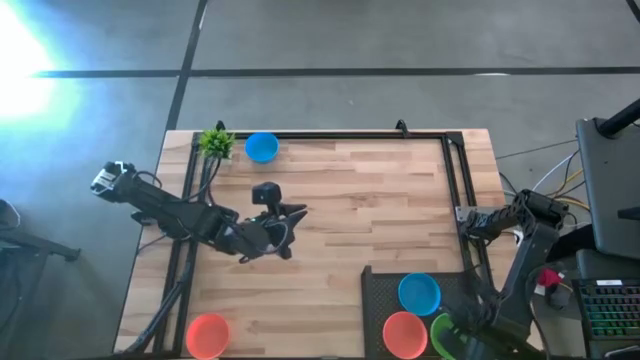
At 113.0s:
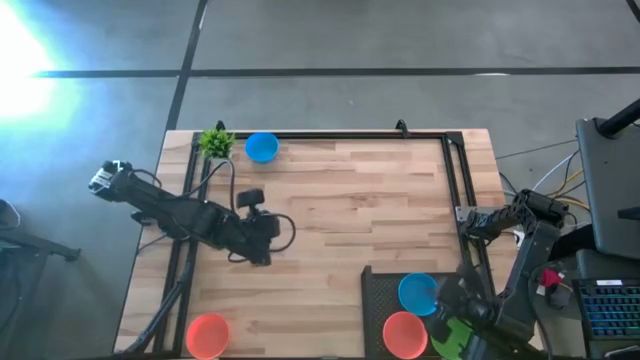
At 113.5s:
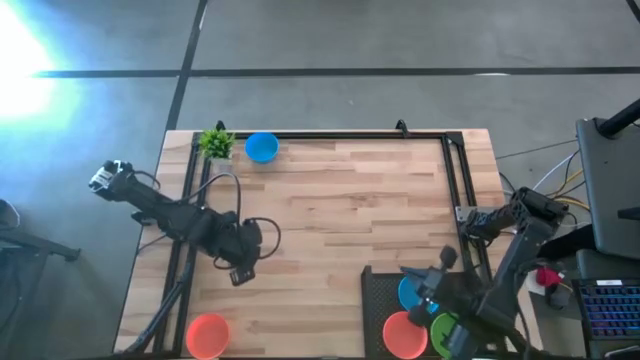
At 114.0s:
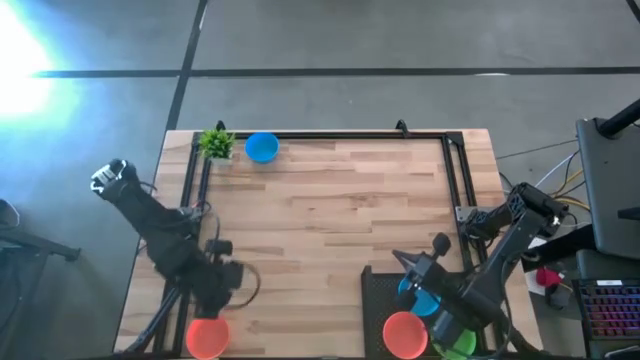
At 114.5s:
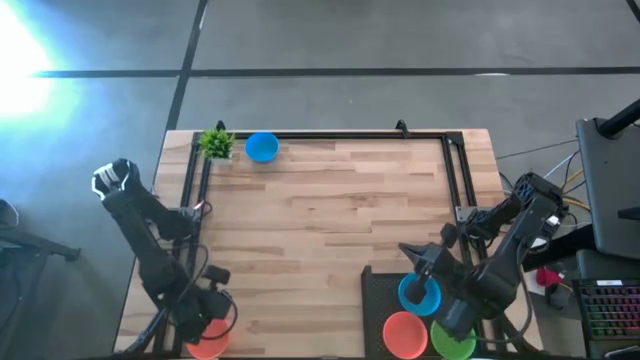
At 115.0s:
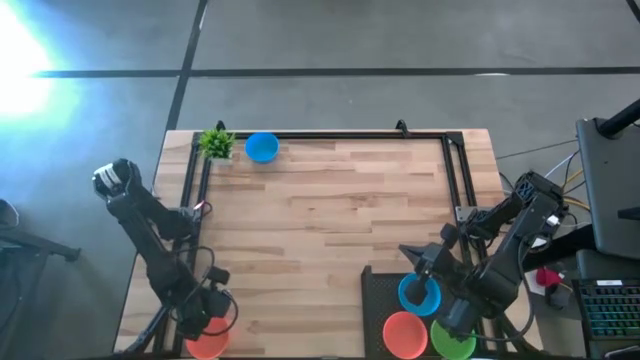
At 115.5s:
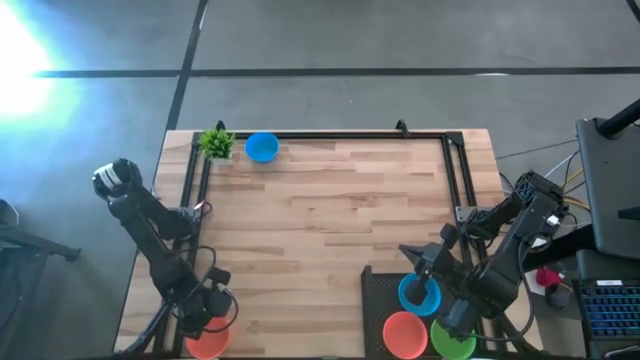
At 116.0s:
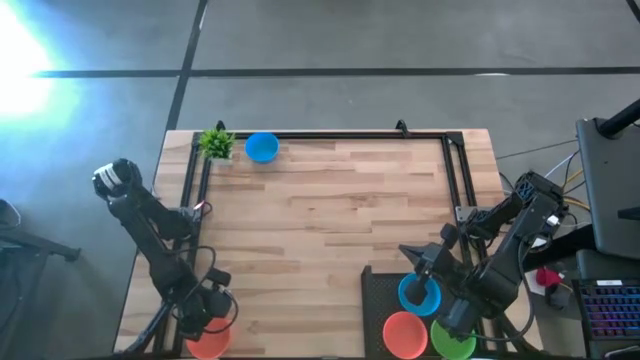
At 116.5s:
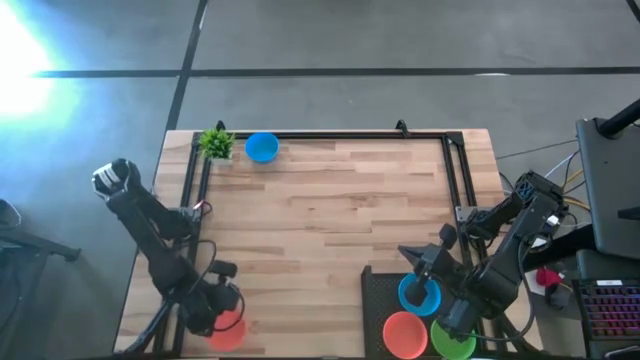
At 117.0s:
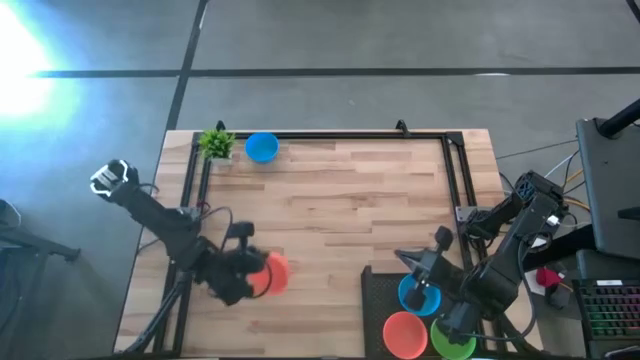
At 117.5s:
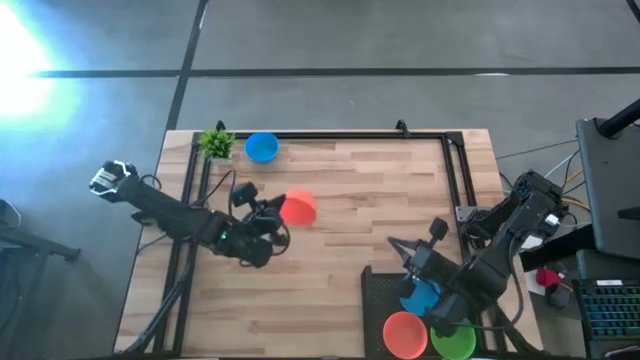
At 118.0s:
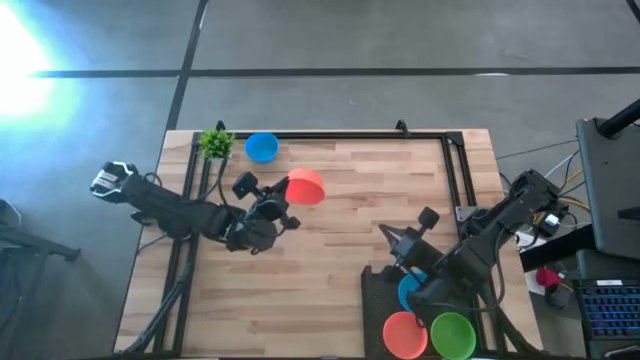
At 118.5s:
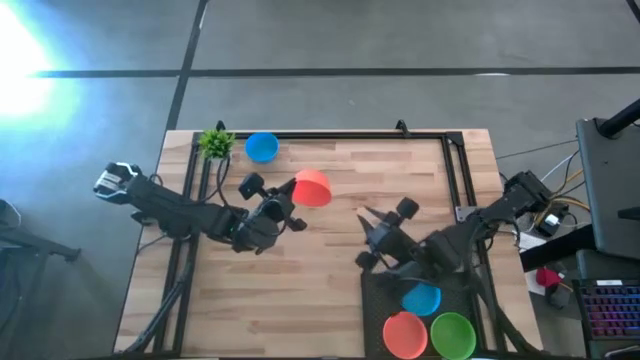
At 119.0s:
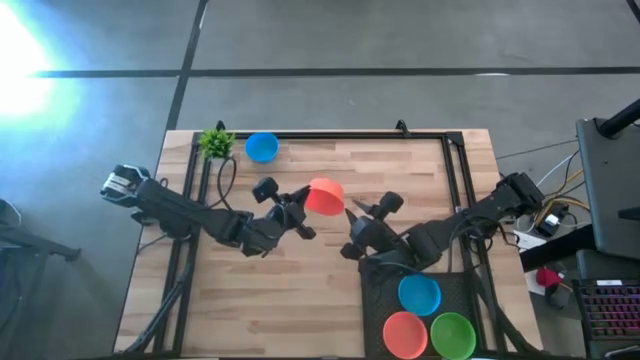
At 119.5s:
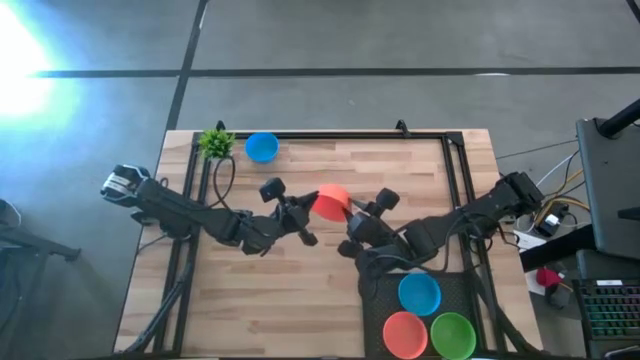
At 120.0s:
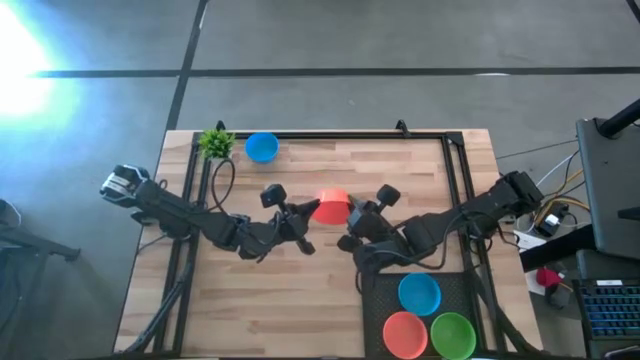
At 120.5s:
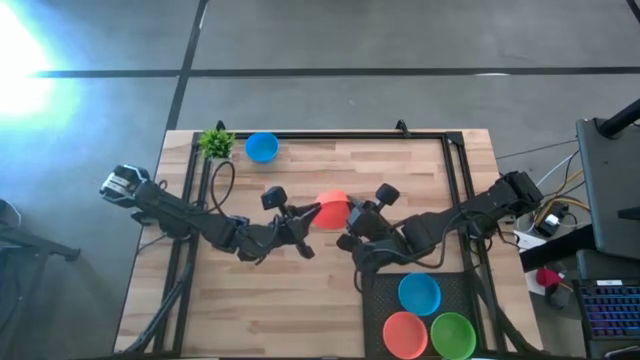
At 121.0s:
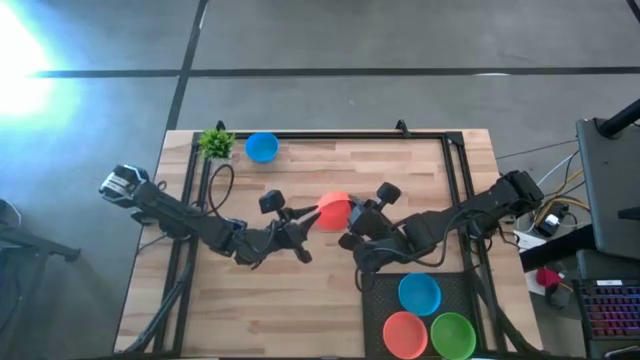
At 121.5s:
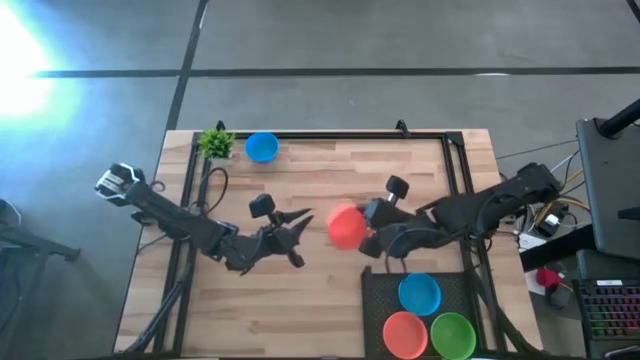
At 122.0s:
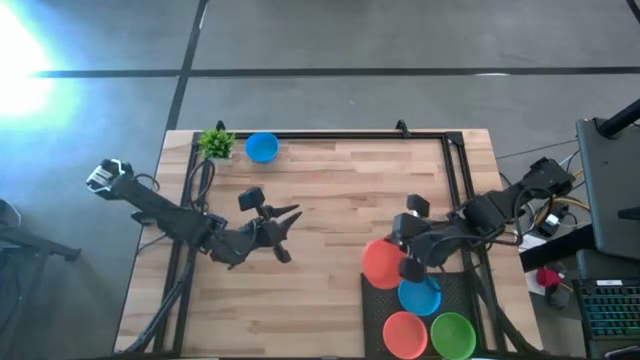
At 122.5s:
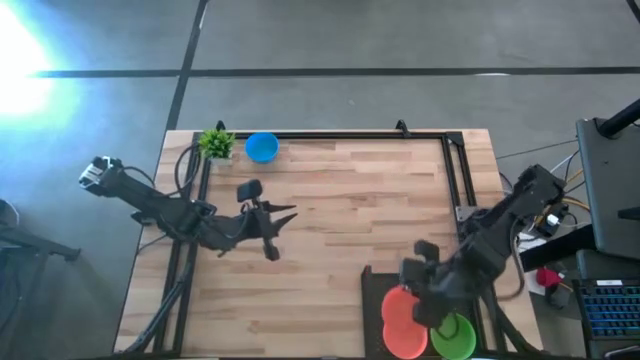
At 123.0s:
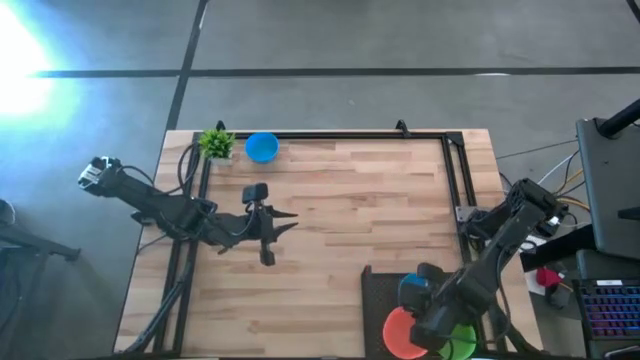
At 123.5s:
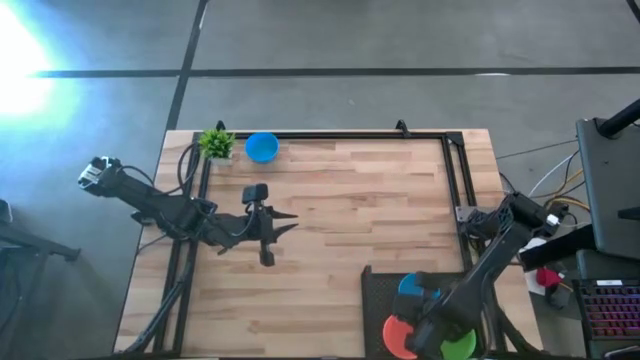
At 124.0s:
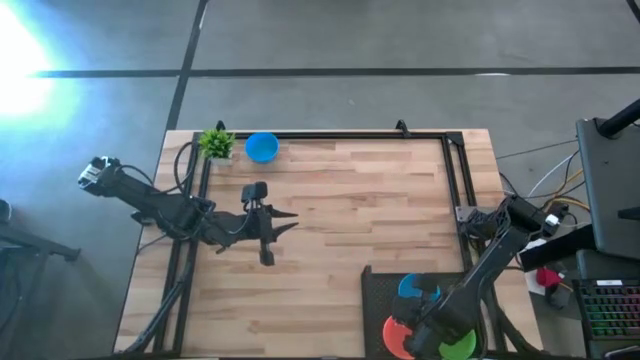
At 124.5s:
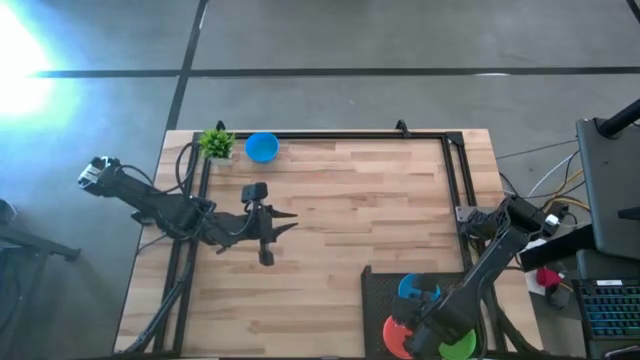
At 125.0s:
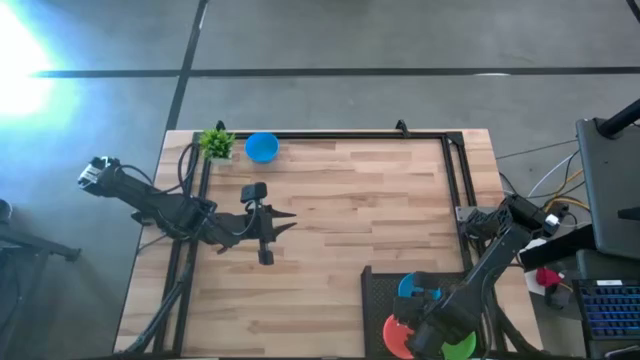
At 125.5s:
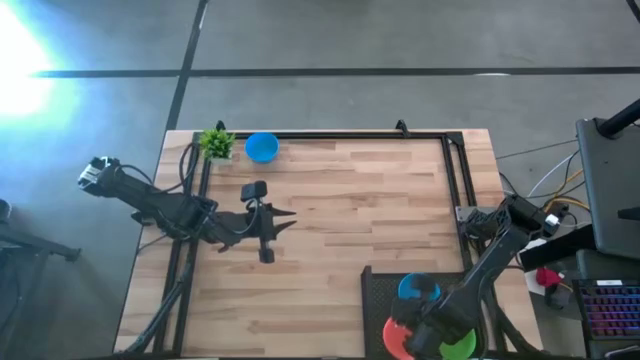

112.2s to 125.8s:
Task: Pick & Place Mini bowls
Stack the orange bowl on the orange bowl on the shelf

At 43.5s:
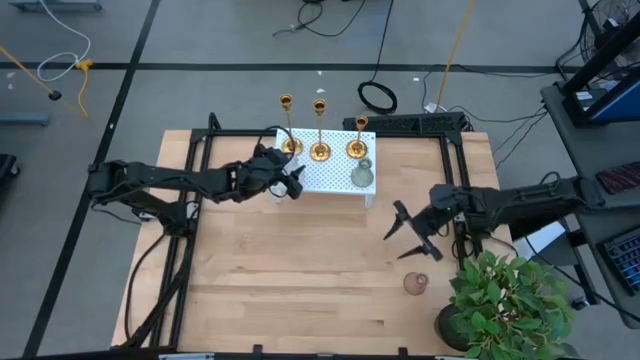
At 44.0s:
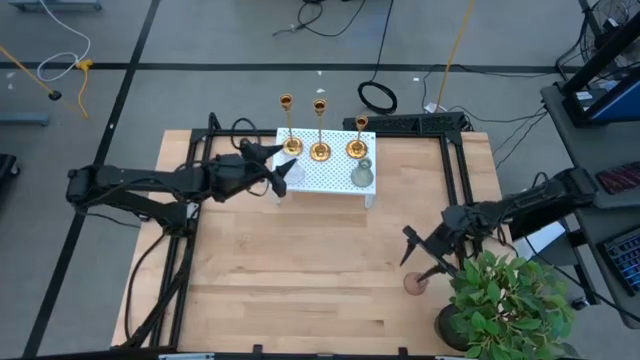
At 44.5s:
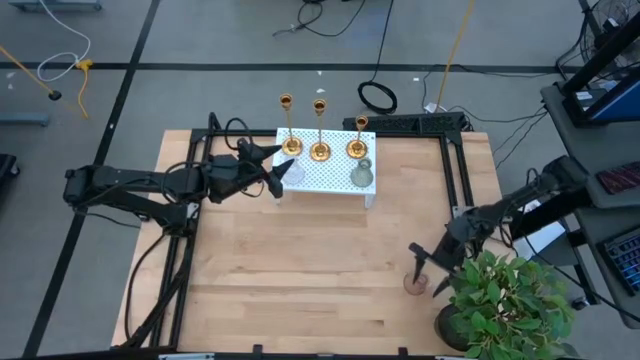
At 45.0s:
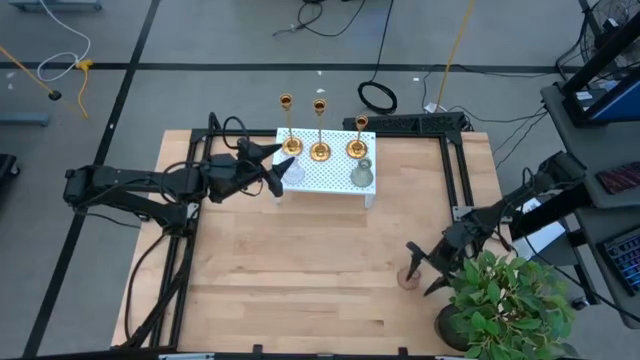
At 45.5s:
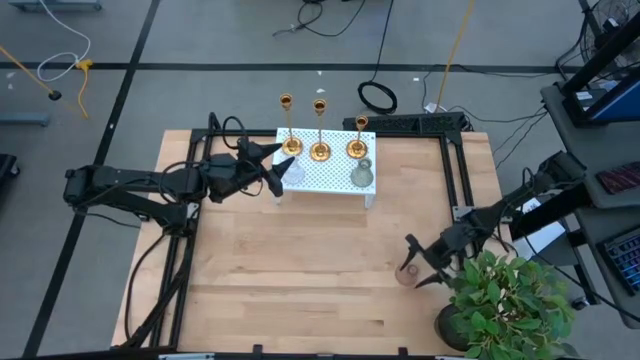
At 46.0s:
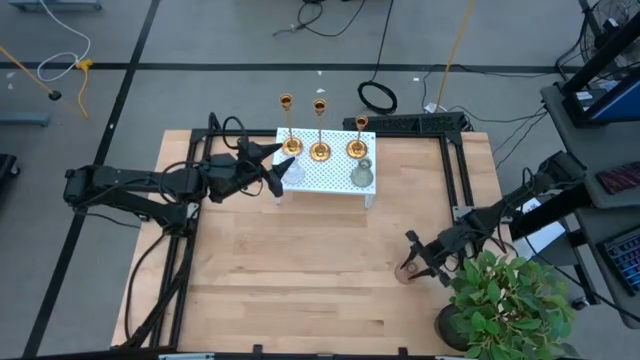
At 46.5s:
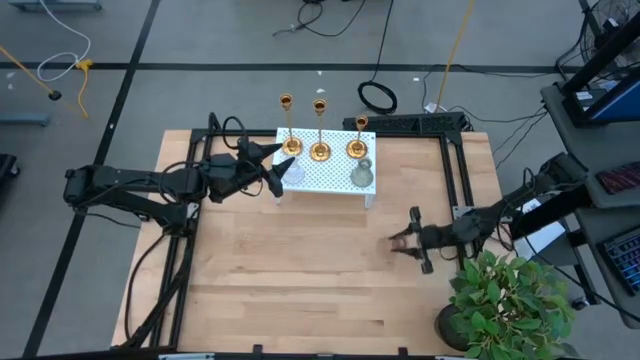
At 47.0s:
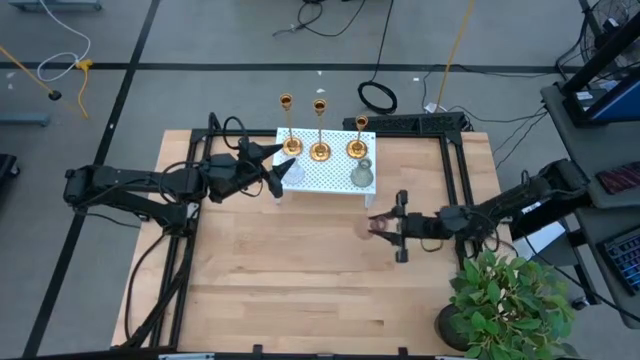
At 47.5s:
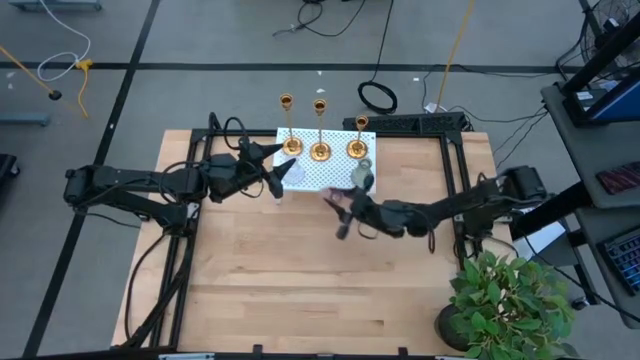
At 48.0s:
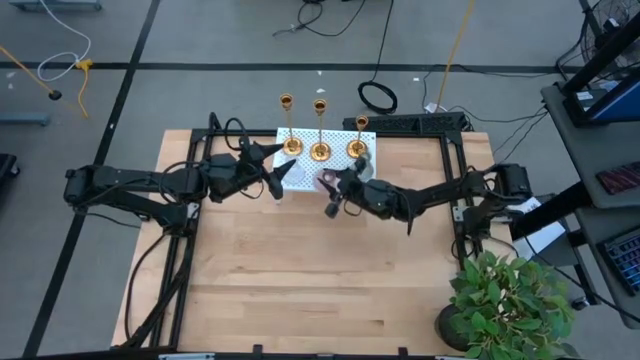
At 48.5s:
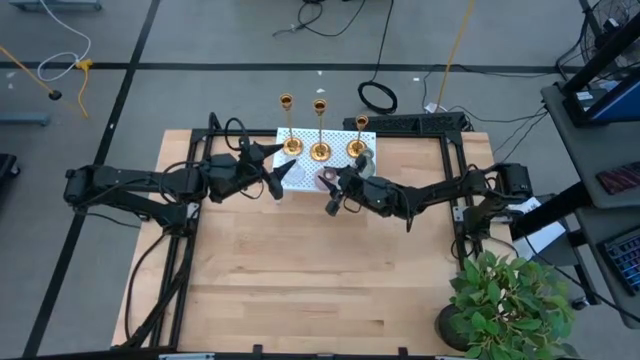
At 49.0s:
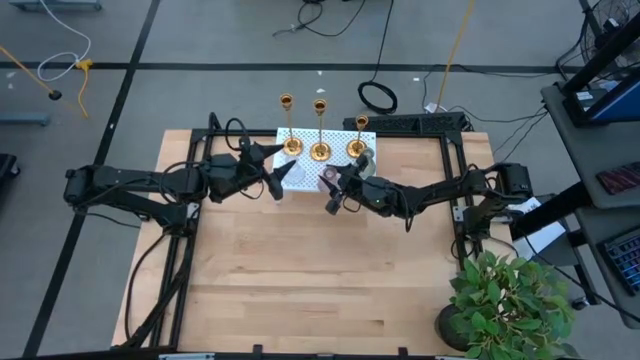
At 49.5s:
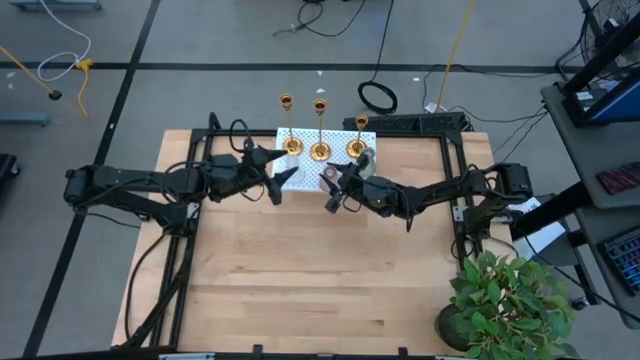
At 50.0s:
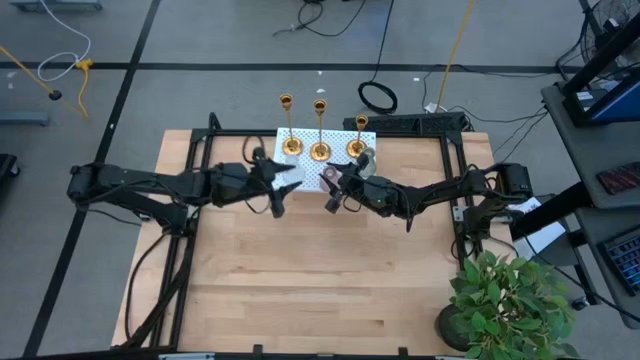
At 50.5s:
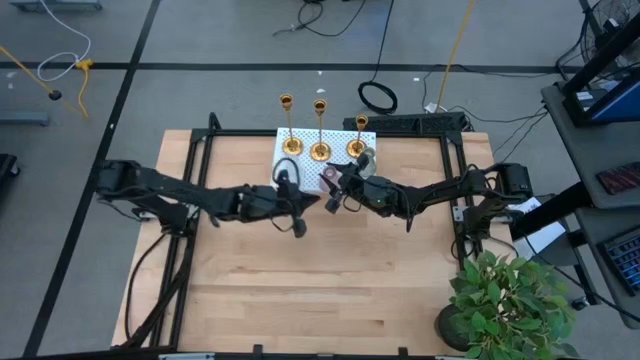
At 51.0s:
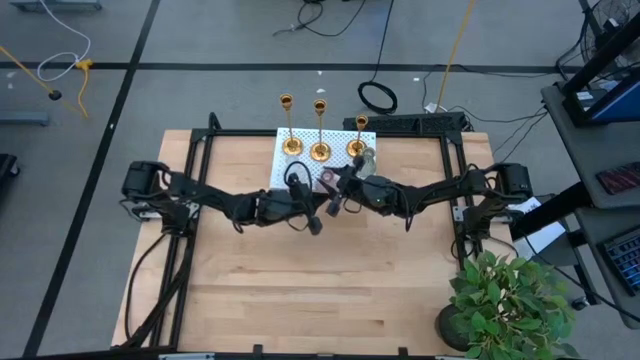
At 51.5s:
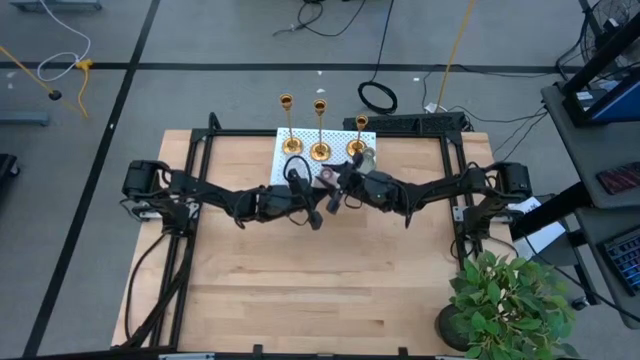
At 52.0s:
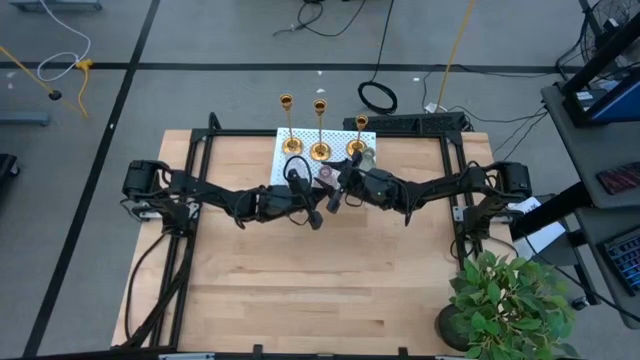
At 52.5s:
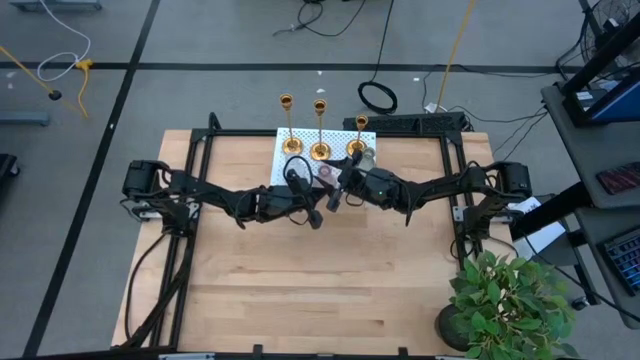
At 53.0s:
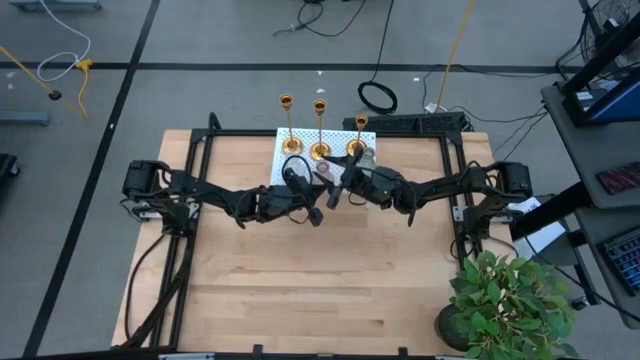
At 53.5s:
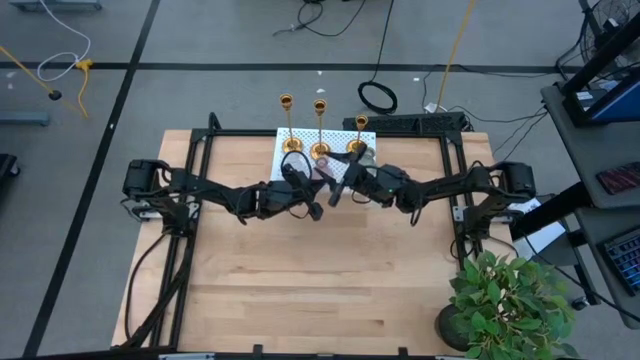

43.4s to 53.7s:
Task: Pick & Place candle stick holders
Put the pink vase on the shelf
